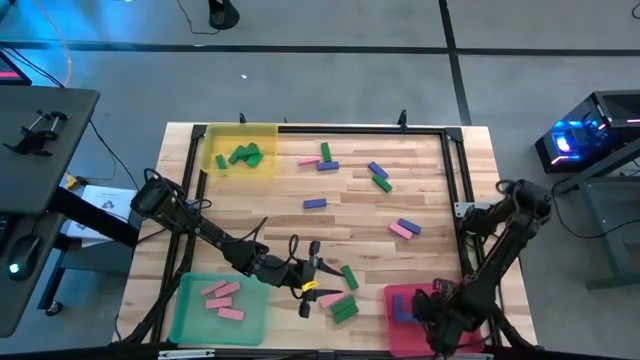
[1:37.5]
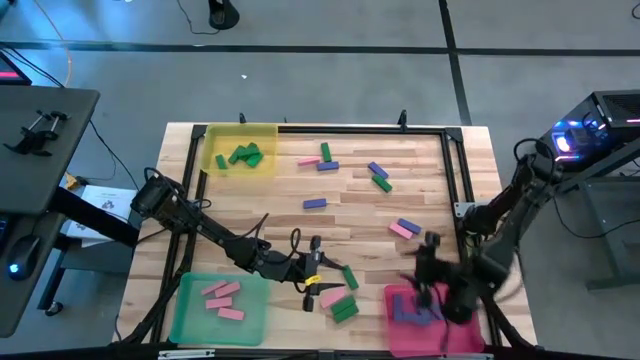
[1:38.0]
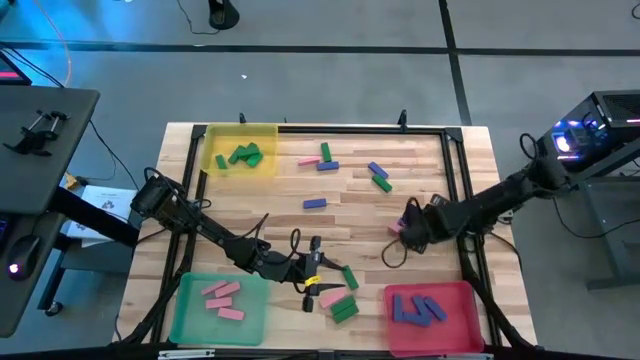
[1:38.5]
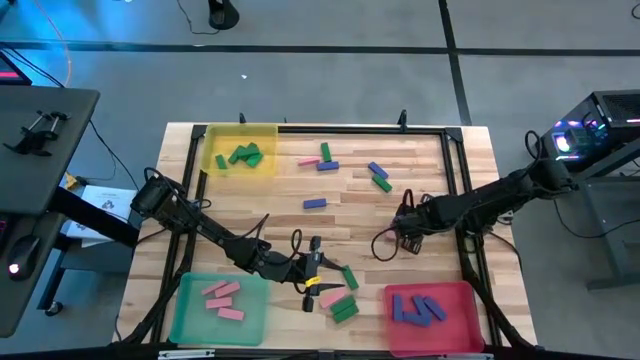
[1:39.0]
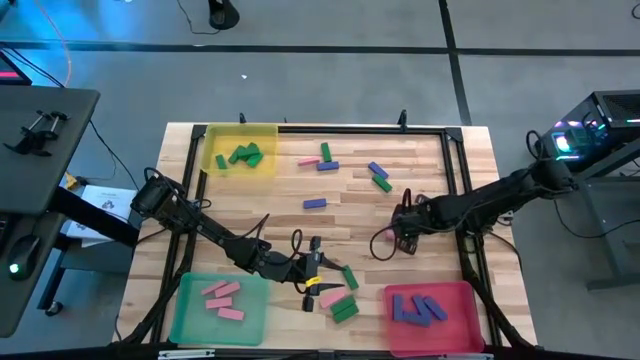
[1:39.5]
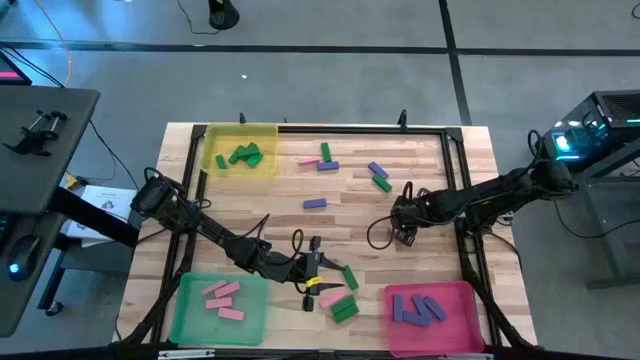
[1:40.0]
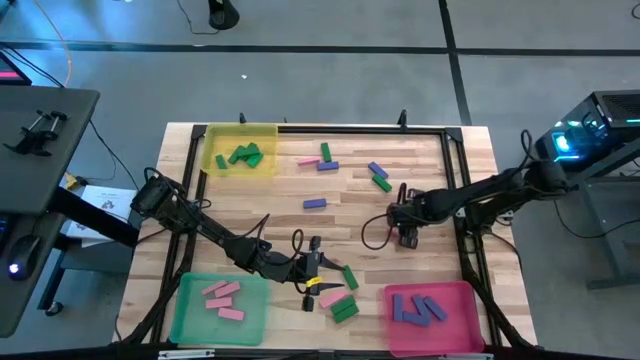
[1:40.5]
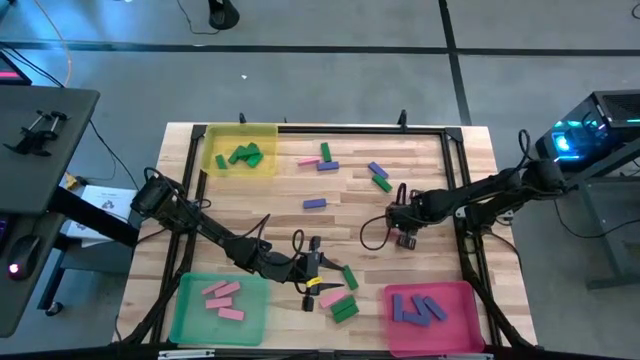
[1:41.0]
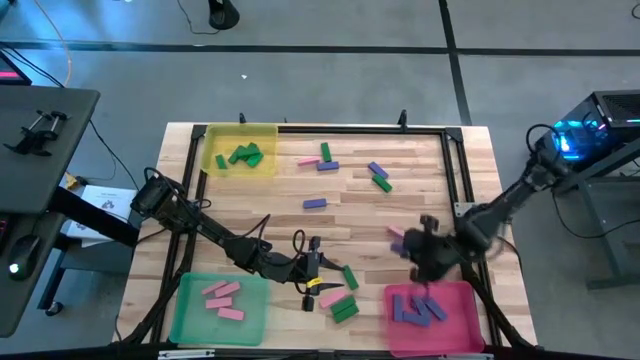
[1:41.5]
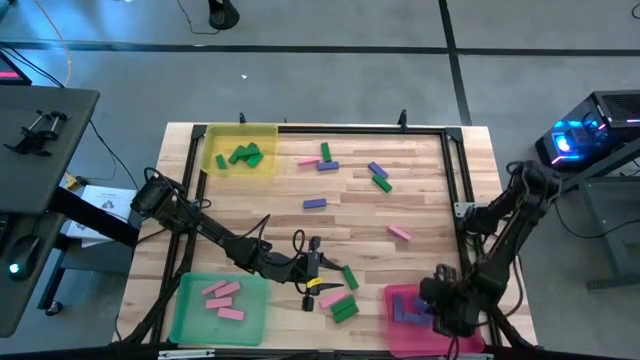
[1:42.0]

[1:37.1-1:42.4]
Task: Sort blocks
Put the violet block into the pink bin

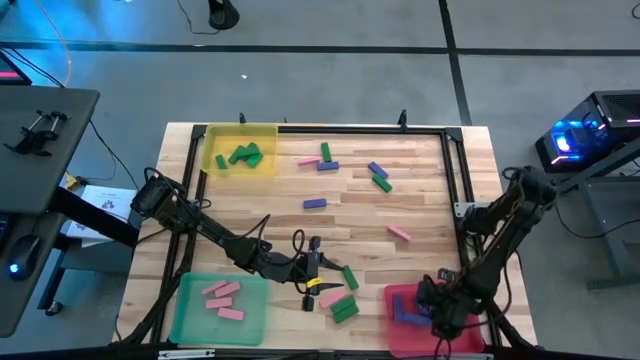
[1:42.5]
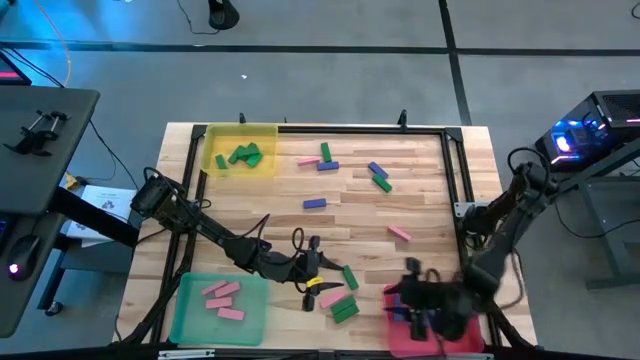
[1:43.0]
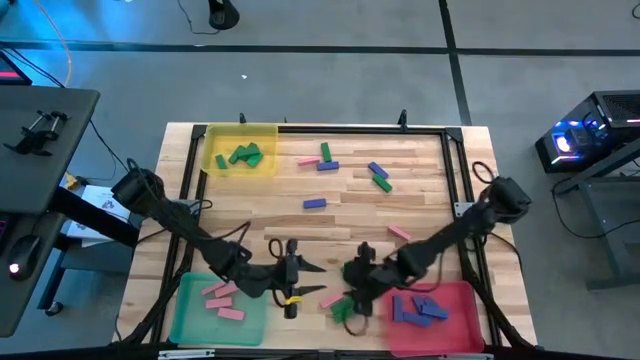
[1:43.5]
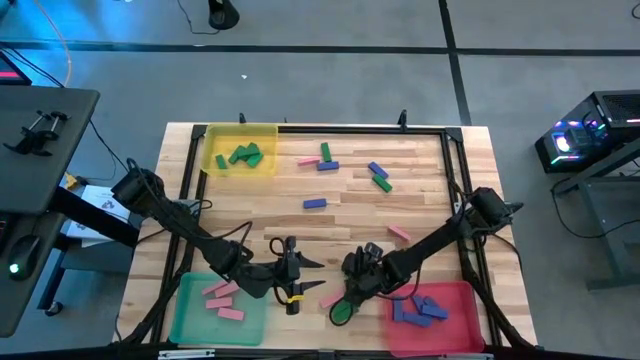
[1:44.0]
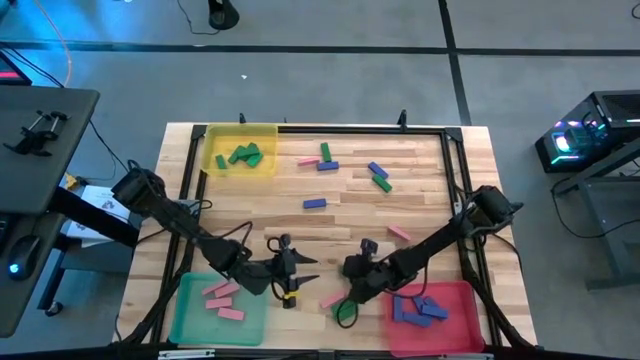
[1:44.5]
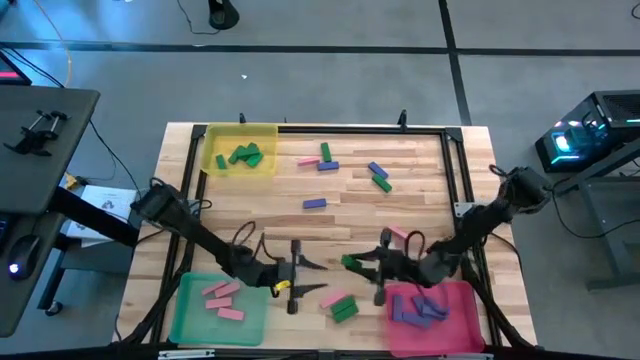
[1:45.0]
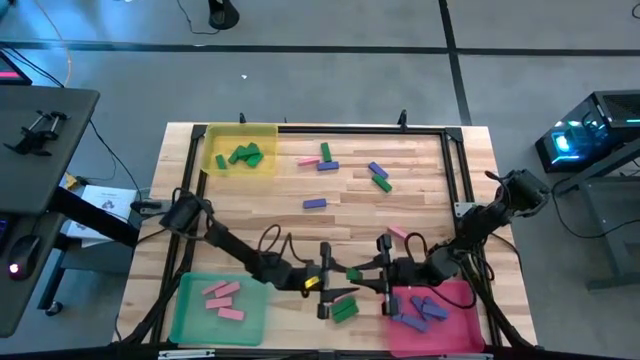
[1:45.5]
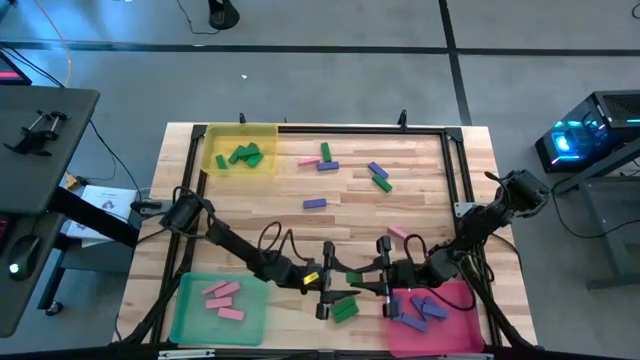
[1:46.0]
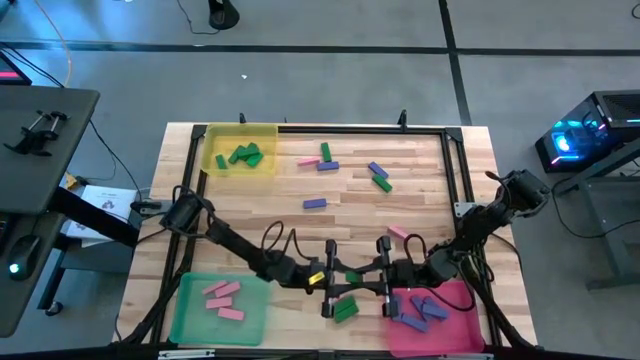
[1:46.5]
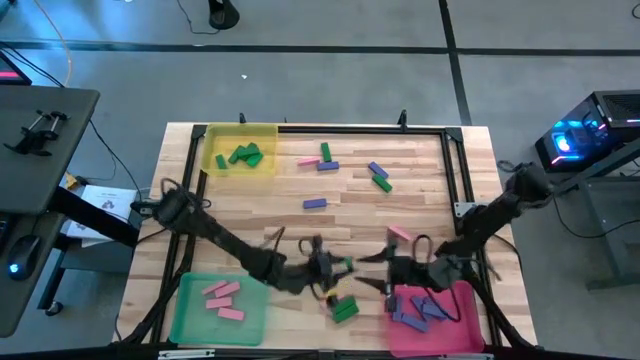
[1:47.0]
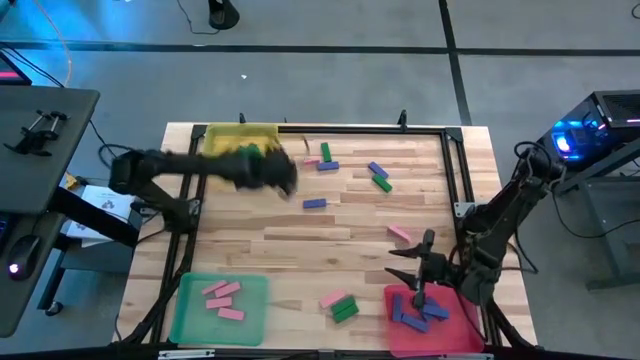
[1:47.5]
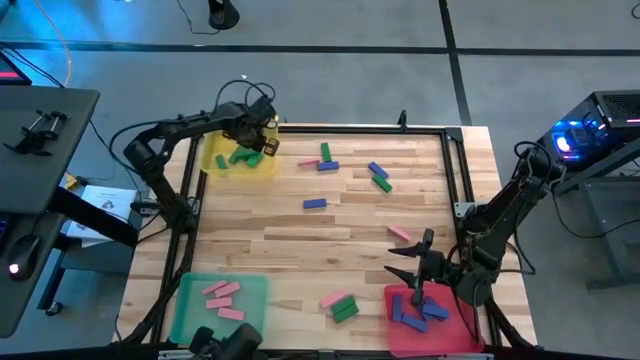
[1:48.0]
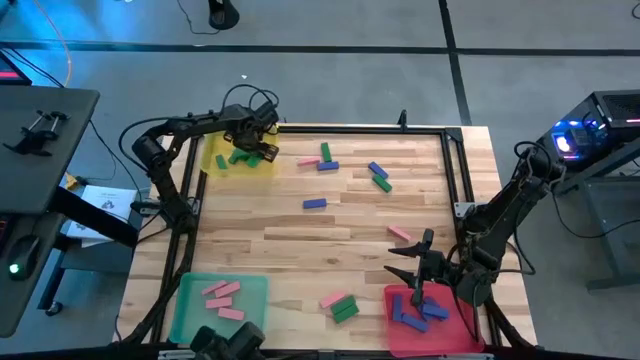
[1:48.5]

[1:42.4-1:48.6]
Put the green block into the yellow bin

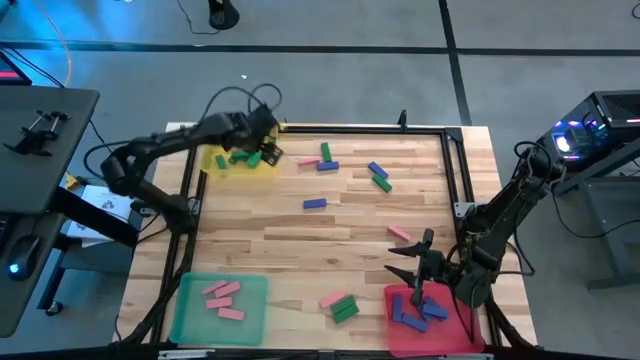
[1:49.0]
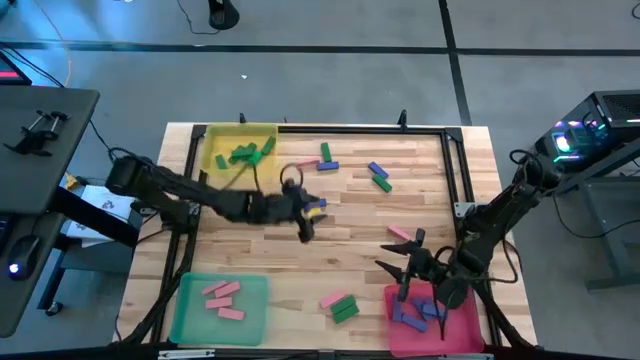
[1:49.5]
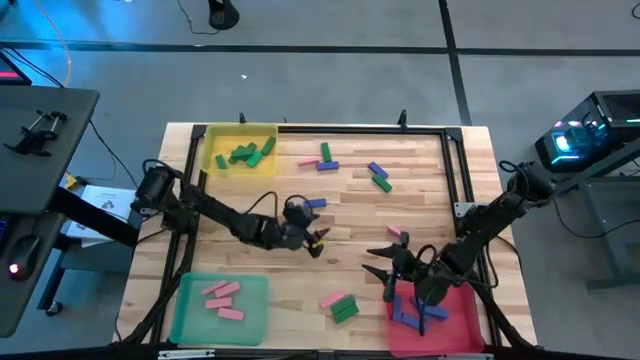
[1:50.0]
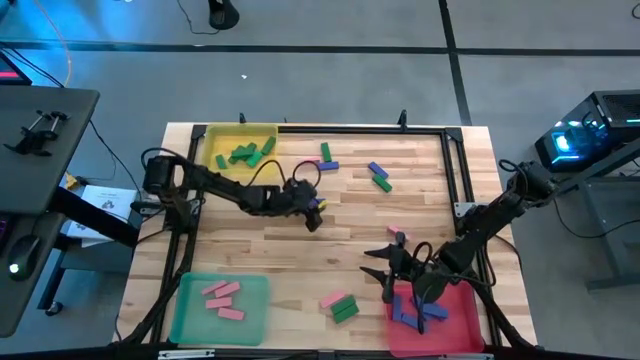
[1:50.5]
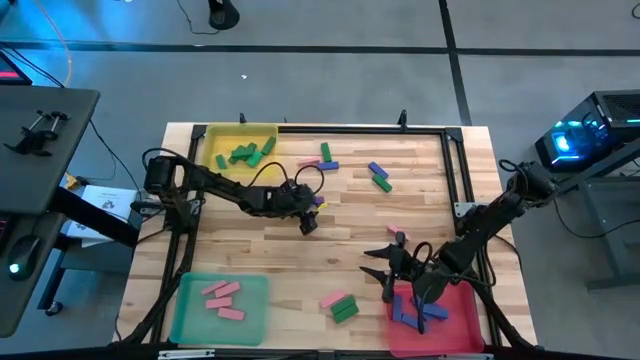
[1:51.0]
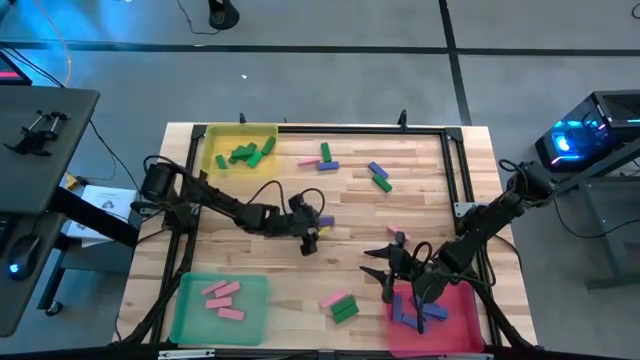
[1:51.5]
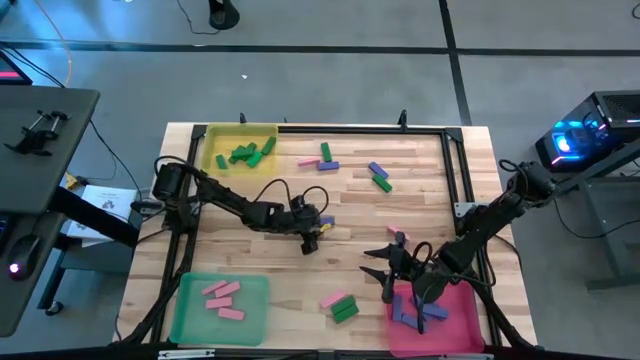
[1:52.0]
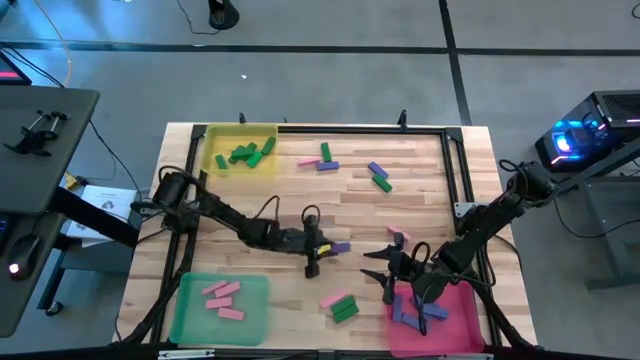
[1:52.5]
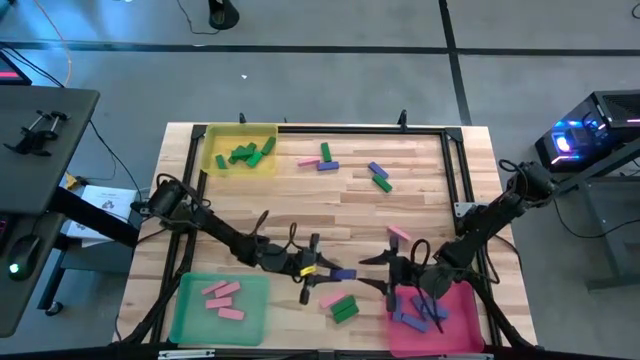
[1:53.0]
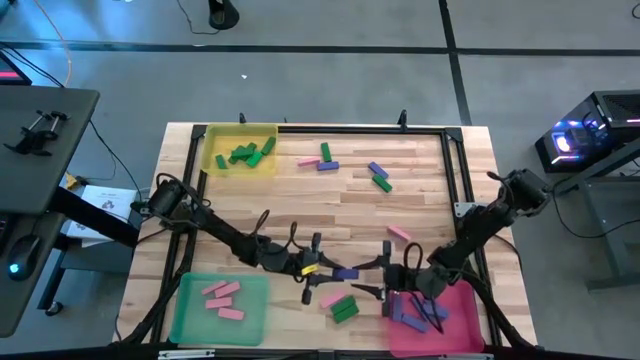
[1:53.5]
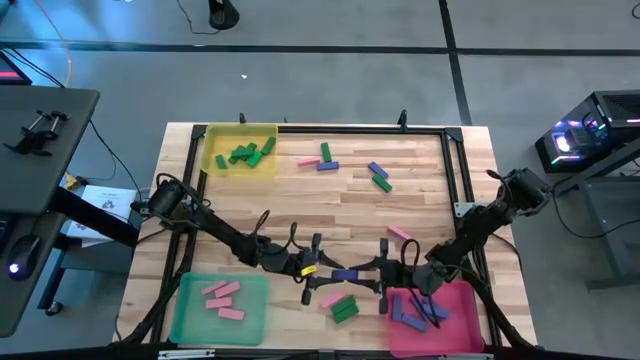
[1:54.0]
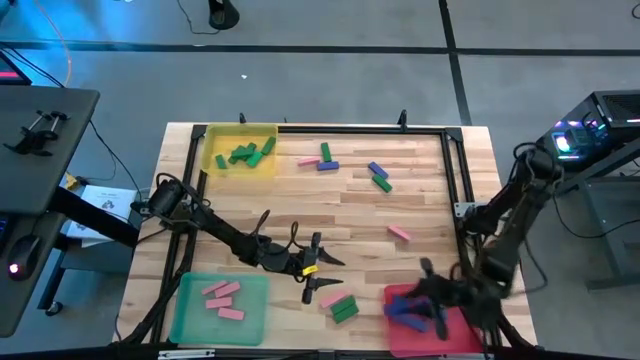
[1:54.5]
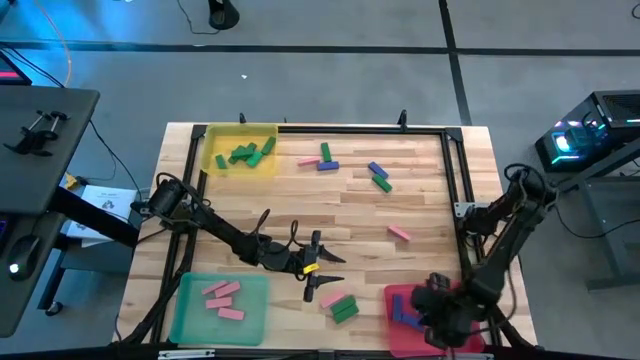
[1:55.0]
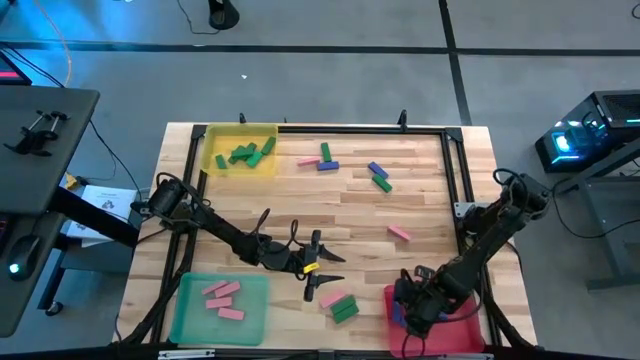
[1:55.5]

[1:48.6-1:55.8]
Put the violet block into the pink bin

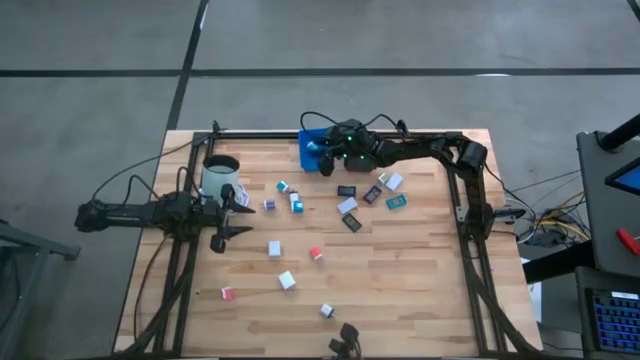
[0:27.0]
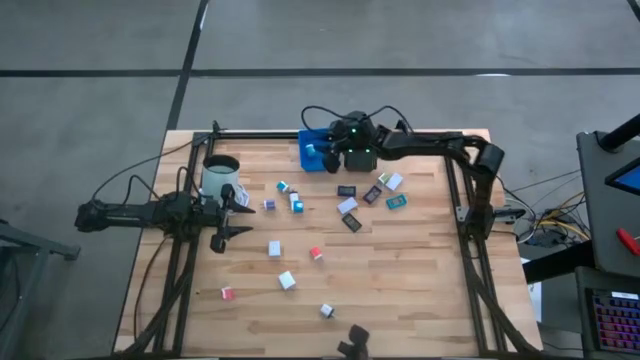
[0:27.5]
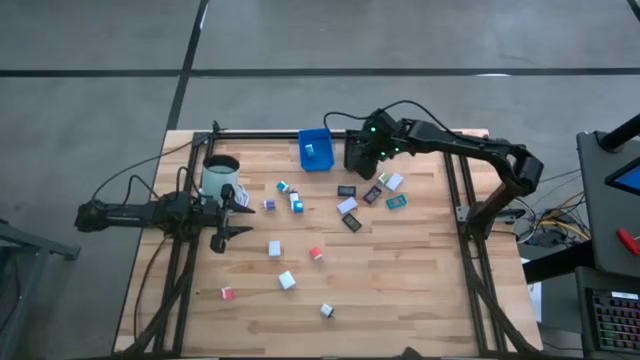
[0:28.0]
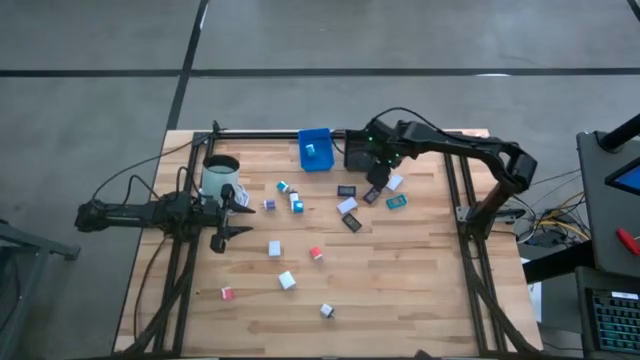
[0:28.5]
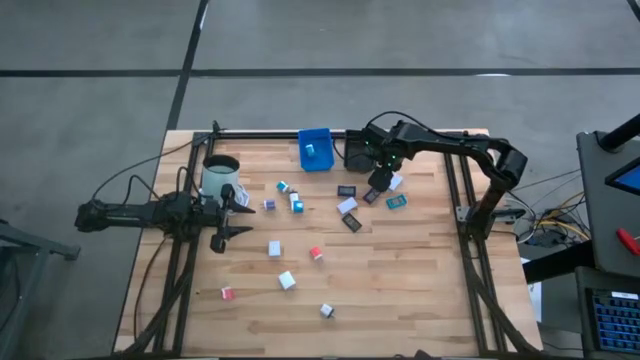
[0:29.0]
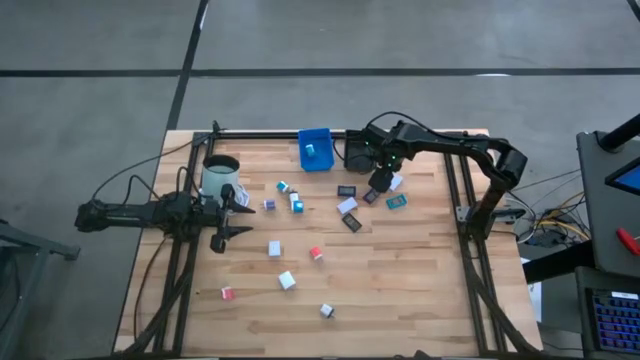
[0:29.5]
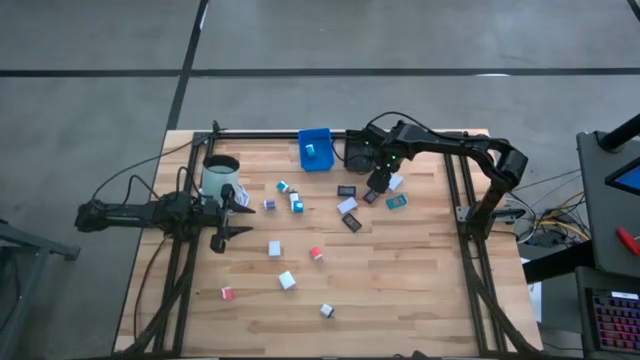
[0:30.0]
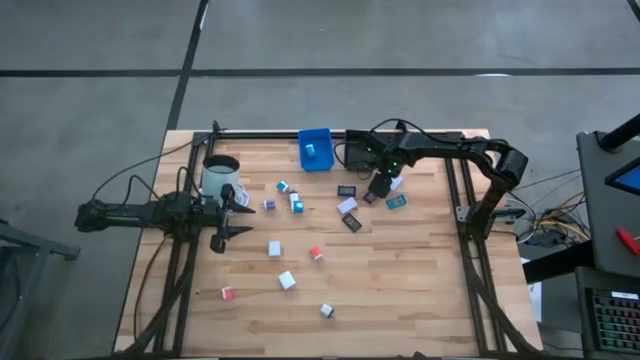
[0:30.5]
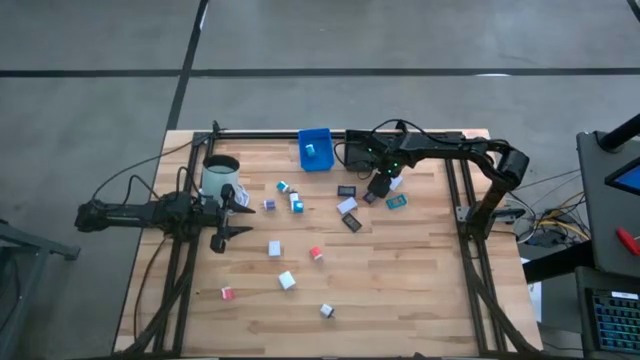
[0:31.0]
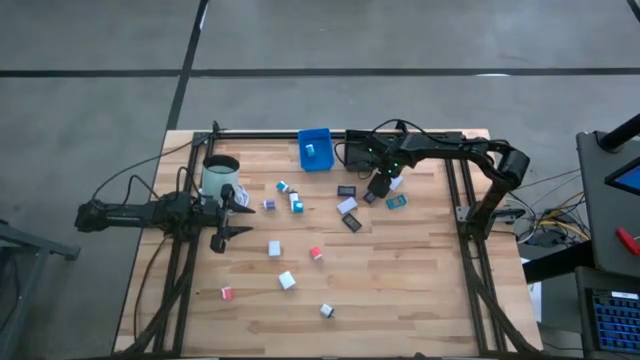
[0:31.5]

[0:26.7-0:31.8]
Task: Pick & Place Office items
Put the small green adapter into the blue basket
